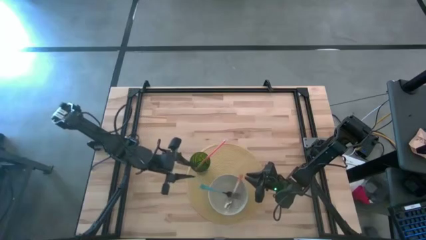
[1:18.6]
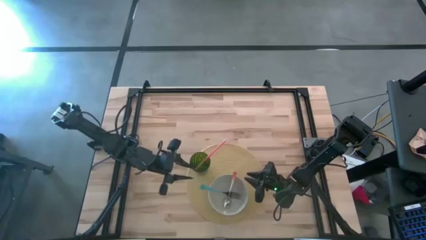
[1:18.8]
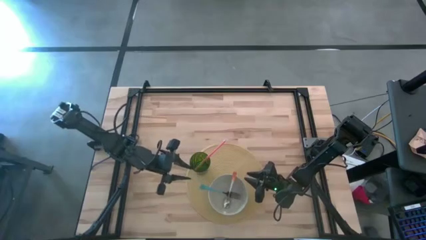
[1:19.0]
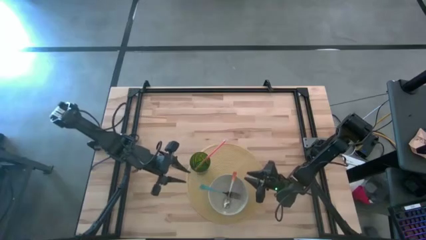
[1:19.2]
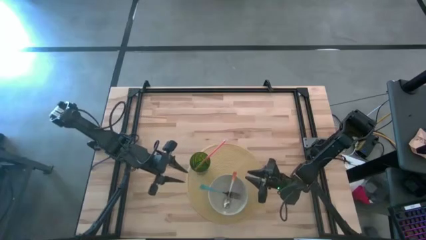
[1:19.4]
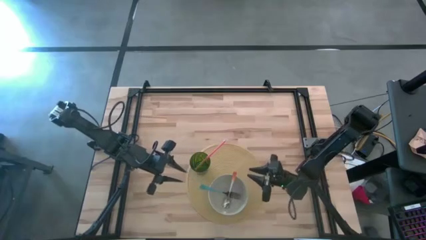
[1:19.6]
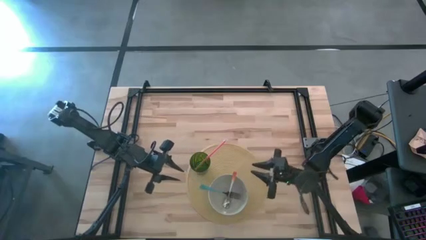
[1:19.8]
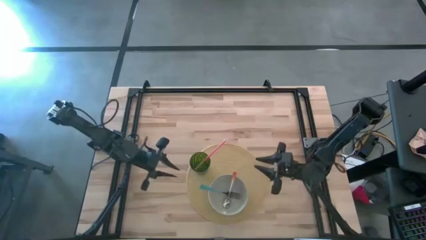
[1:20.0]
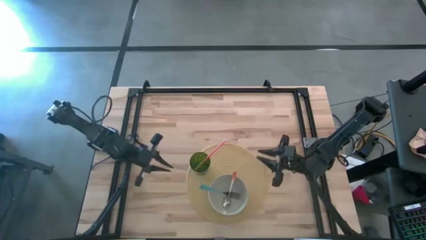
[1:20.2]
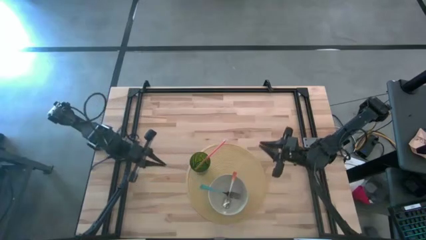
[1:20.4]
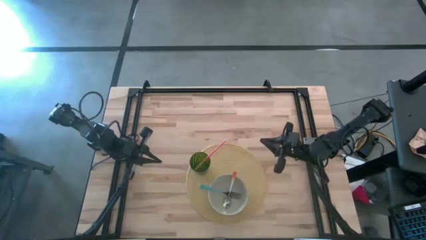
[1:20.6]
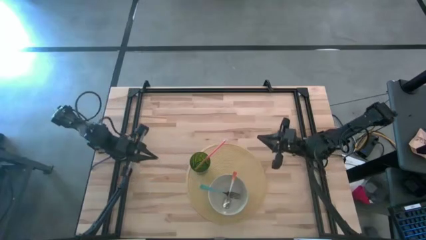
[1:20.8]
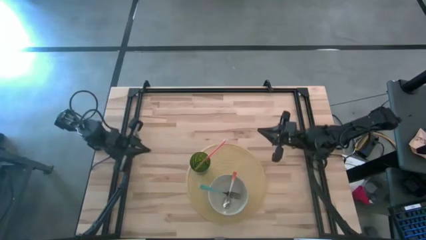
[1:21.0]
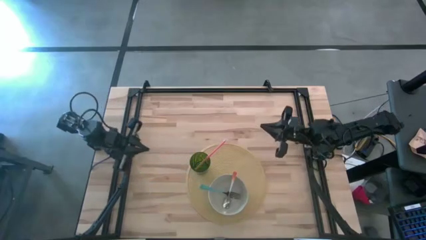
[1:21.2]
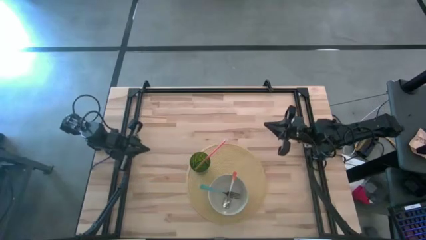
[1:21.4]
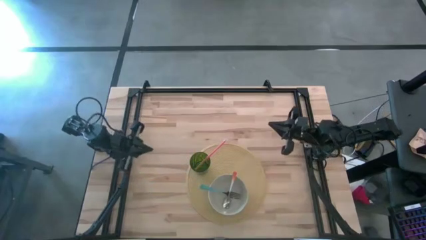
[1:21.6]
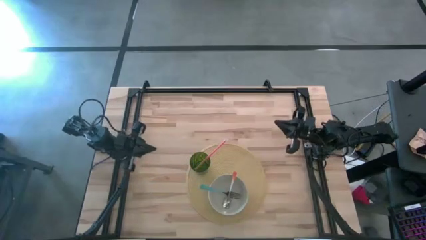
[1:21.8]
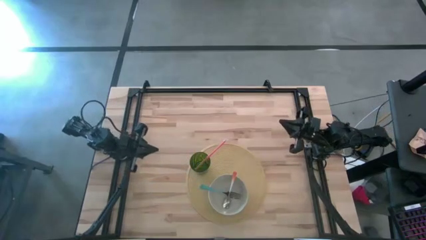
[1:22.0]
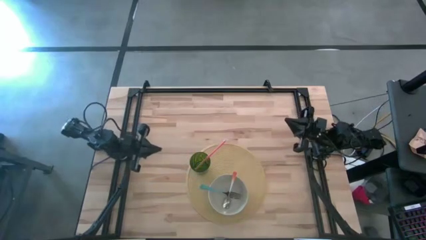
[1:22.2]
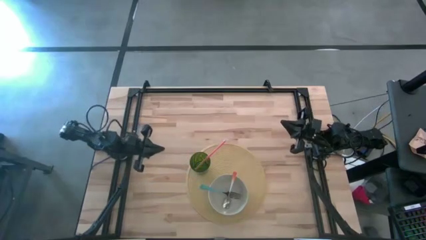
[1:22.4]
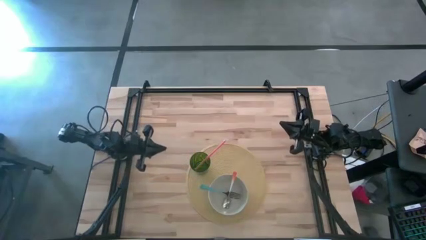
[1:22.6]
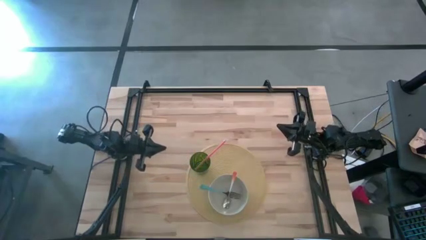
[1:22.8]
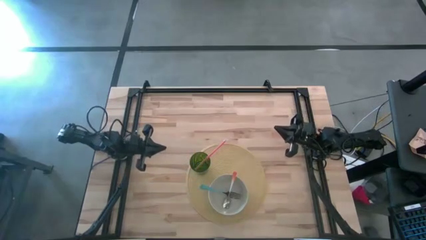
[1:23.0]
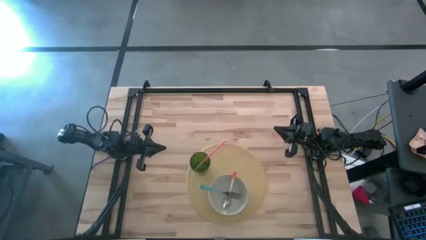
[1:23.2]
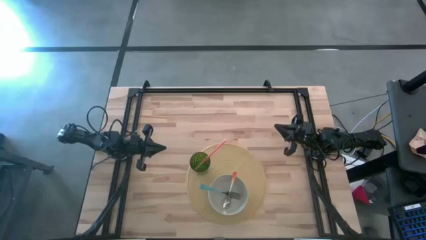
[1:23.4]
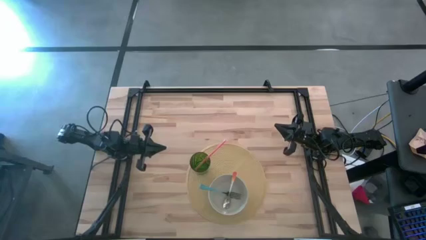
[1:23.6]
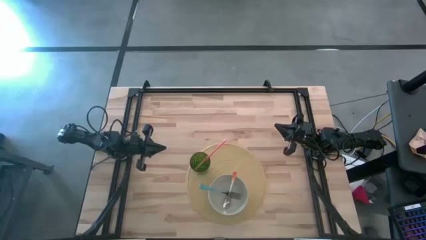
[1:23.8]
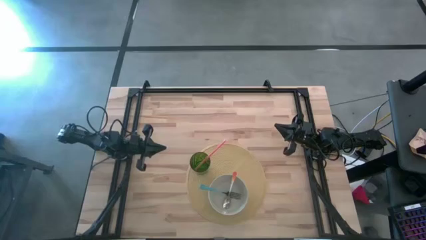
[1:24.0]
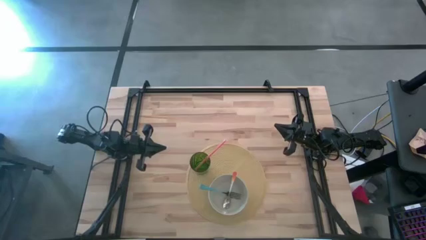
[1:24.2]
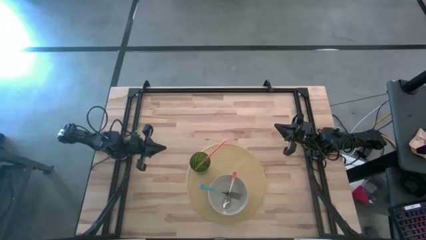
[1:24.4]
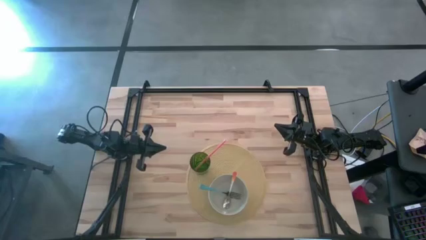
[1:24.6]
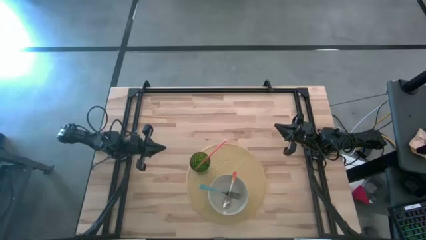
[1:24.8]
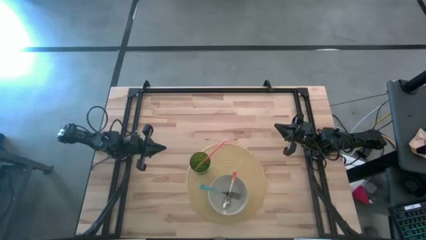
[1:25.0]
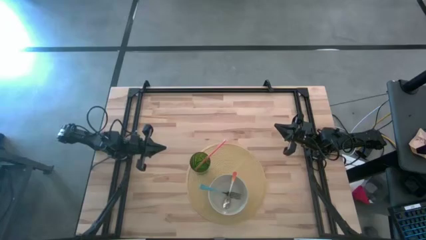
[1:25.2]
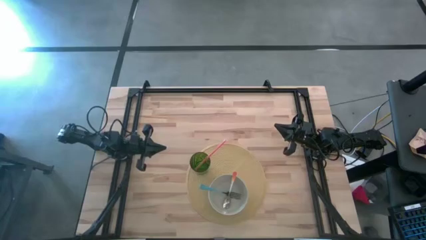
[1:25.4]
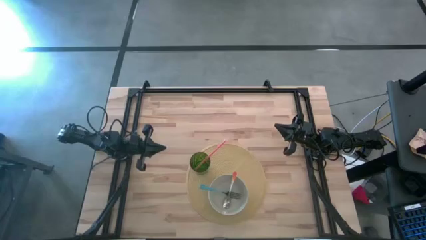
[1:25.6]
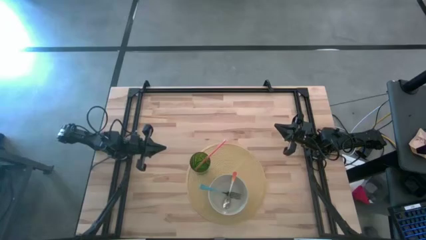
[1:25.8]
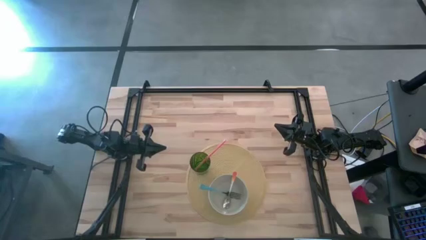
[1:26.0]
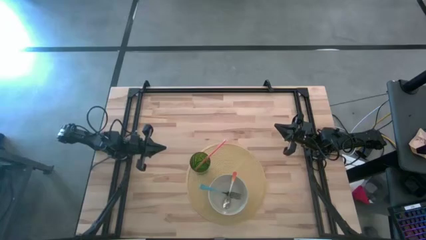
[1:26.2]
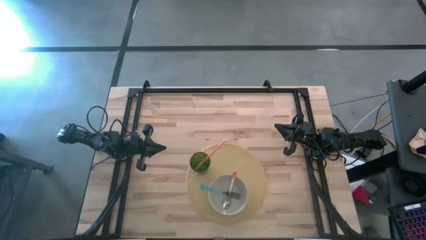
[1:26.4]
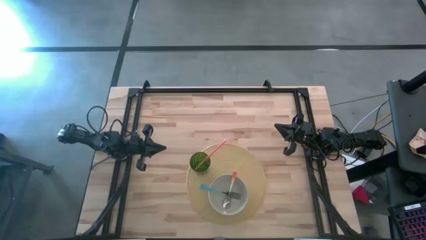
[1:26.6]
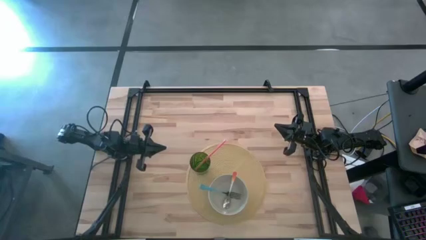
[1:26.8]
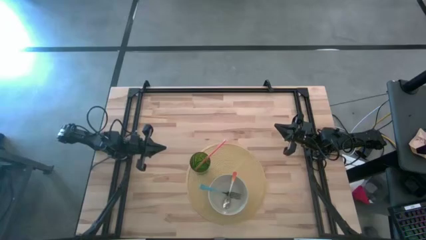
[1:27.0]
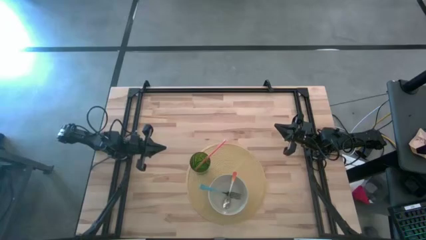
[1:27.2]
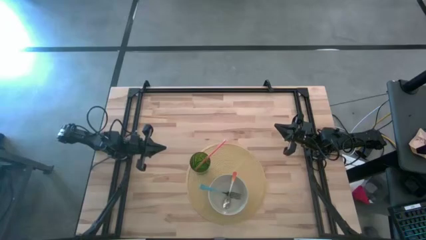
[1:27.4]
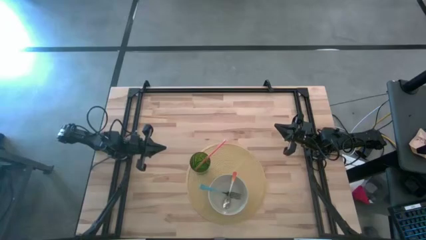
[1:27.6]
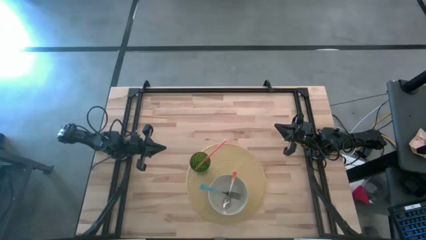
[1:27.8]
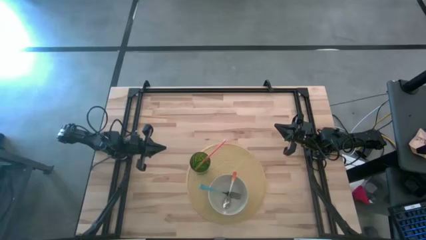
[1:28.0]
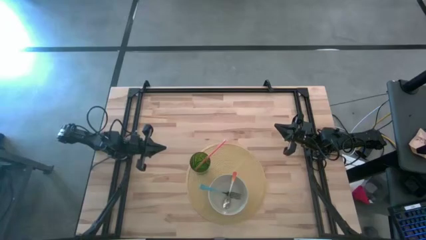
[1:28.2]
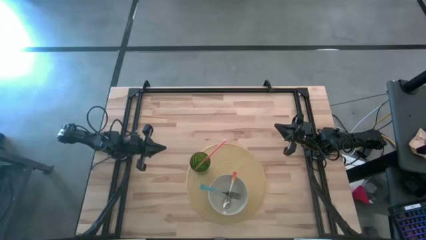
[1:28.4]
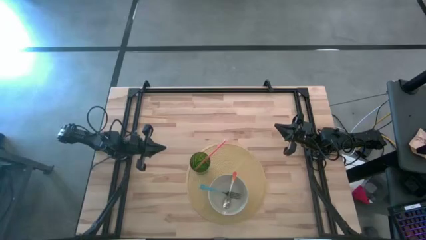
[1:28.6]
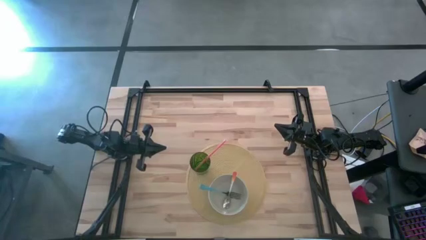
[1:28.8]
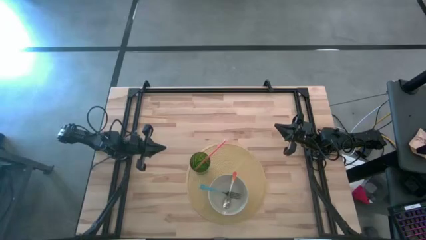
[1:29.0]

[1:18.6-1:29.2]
Task: Pick & Place Utensil
Return to Home Position

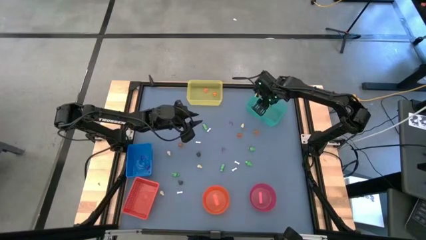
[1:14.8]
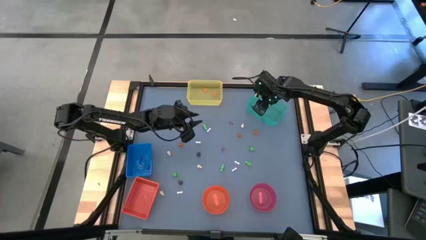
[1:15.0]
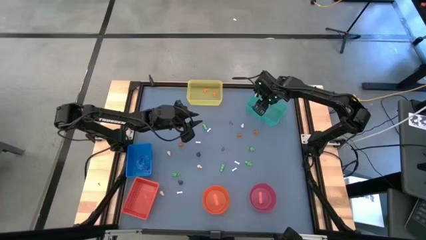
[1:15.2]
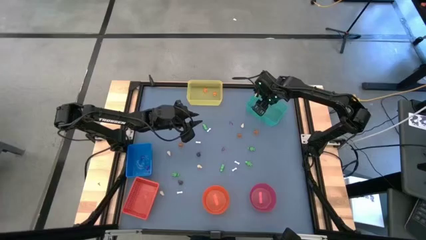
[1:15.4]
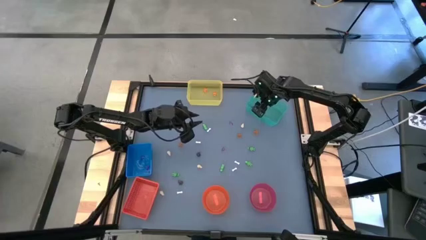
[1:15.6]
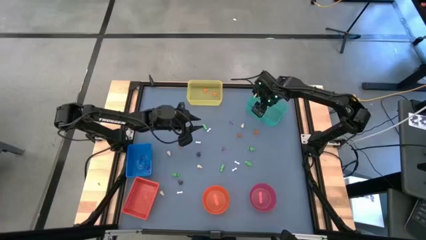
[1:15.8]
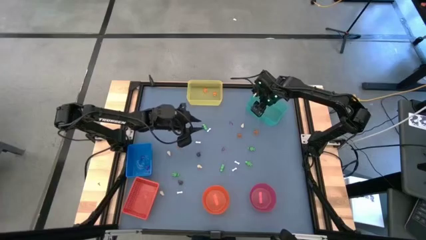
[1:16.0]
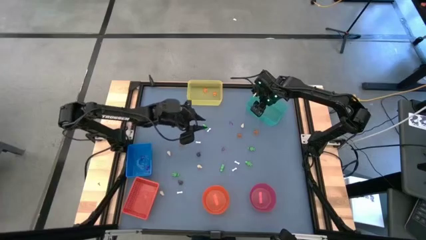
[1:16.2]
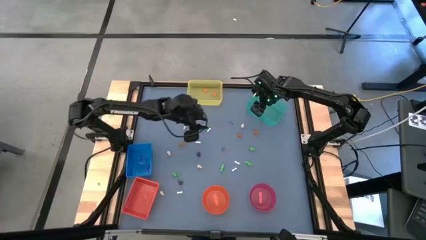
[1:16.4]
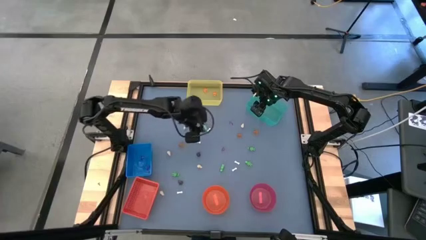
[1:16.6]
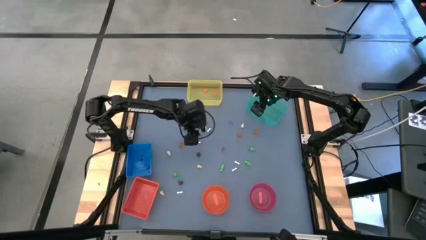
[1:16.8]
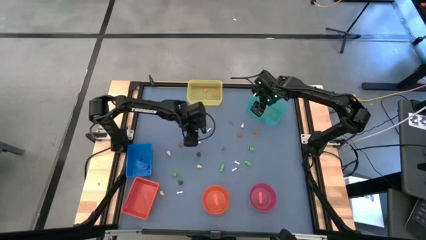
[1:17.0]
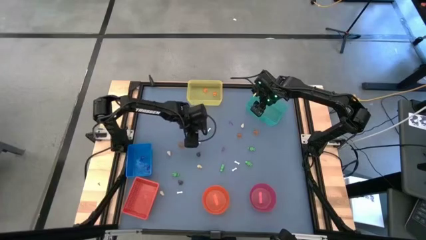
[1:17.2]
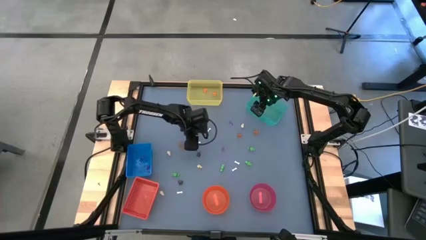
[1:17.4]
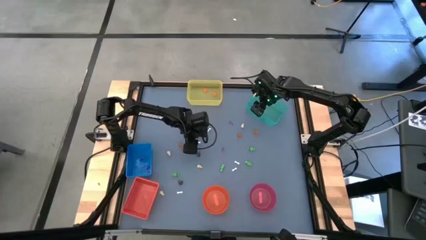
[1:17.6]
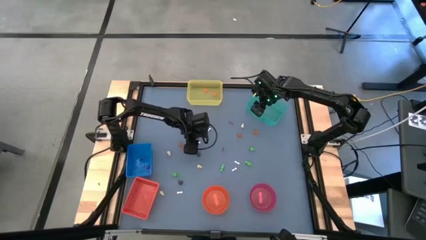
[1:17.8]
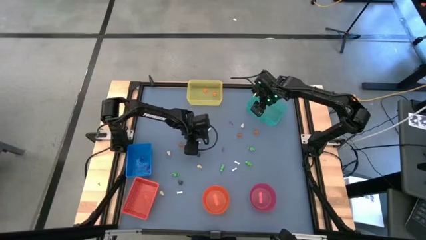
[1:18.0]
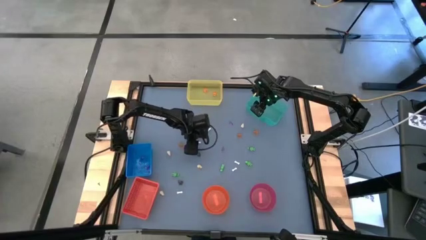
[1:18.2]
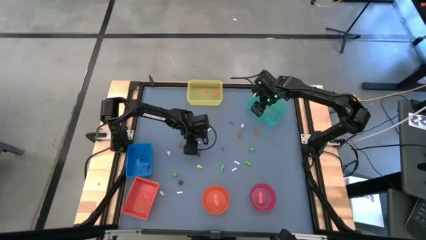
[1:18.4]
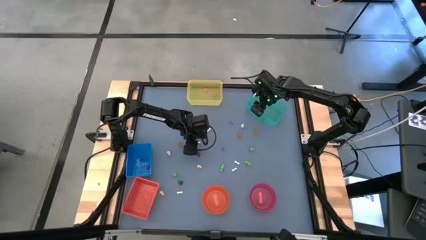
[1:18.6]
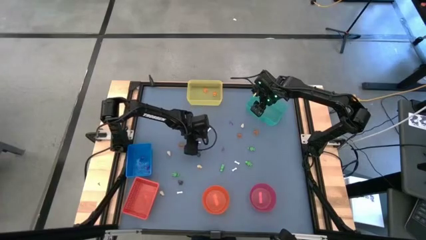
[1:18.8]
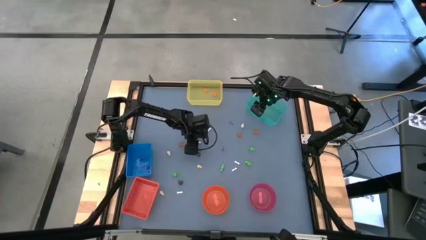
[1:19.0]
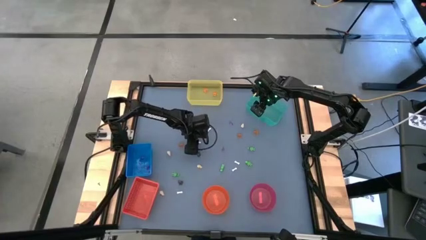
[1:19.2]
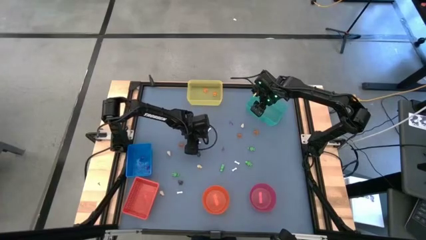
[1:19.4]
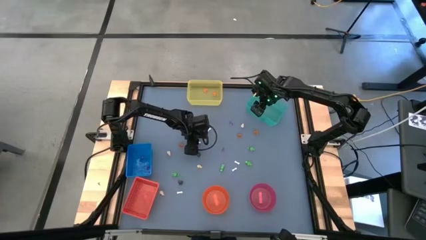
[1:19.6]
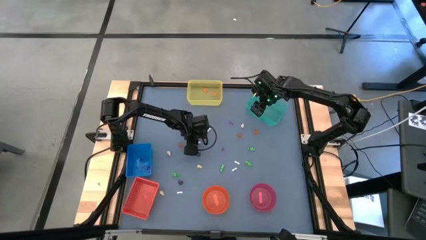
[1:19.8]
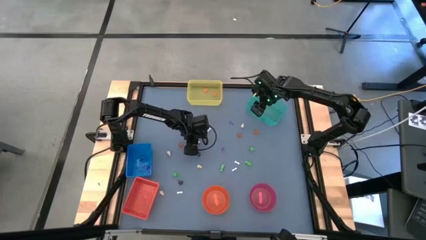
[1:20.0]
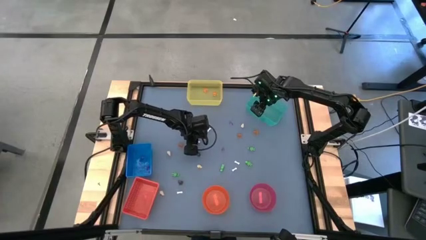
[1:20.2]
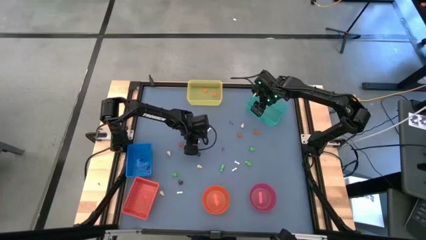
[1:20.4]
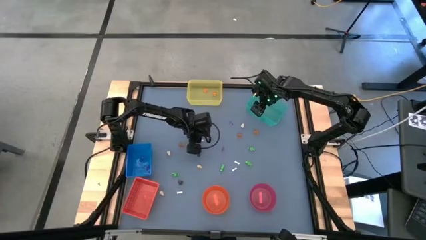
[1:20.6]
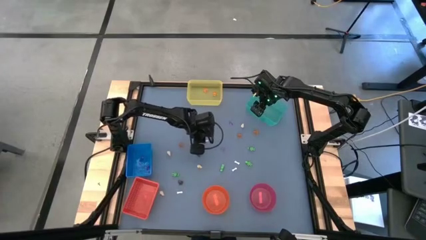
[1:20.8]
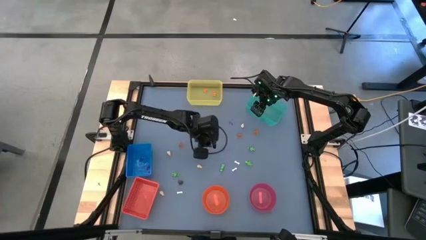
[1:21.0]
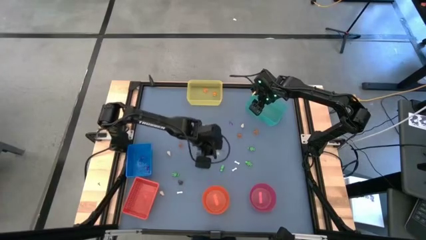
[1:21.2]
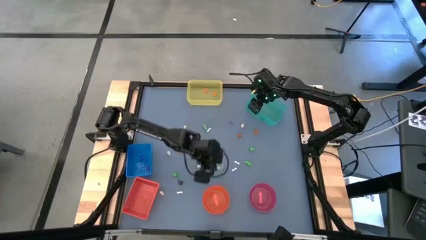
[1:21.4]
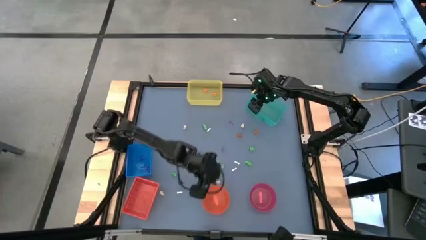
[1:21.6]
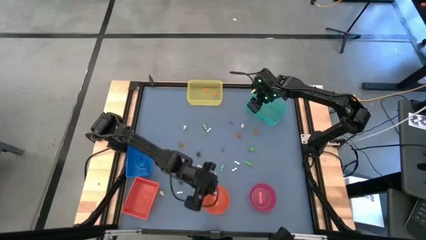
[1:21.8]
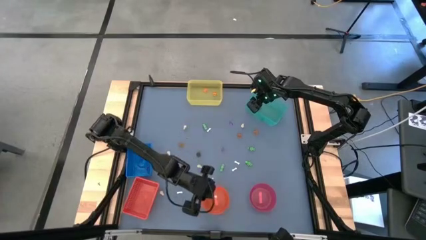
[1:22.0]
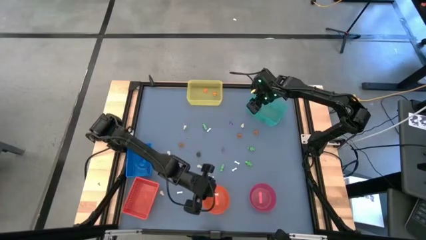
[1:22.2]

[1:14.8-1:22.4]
Task: Sort Halloween decoration
Put the white bone toy into the orange bowl
